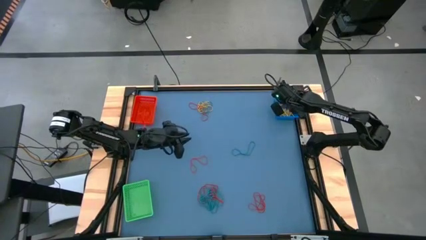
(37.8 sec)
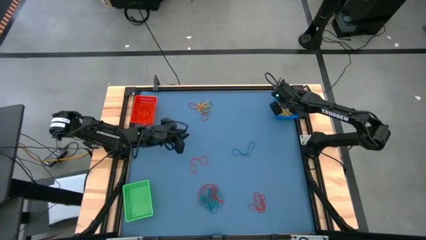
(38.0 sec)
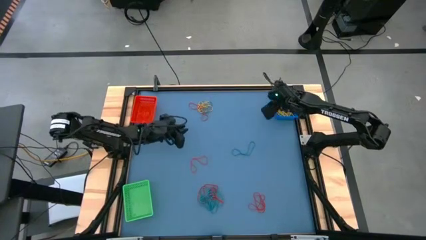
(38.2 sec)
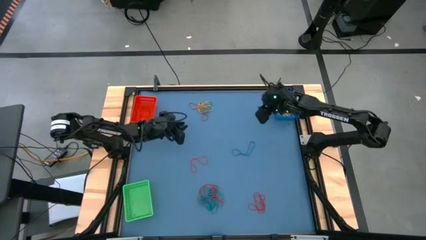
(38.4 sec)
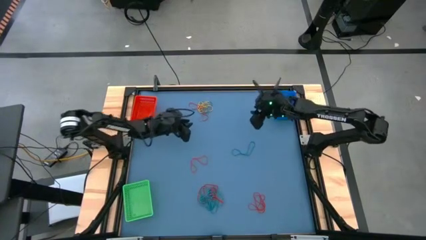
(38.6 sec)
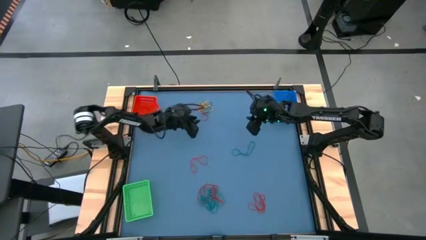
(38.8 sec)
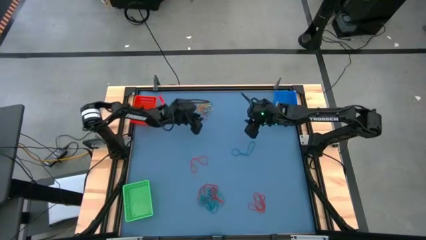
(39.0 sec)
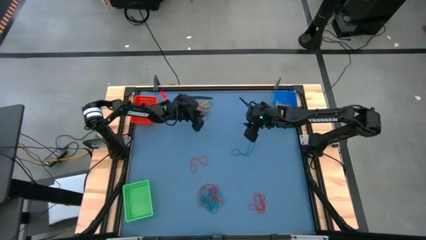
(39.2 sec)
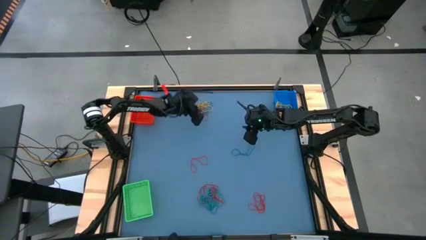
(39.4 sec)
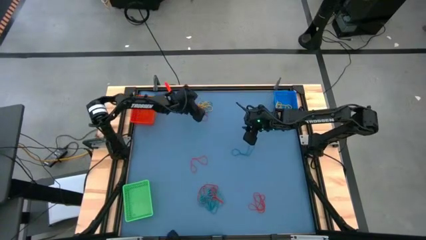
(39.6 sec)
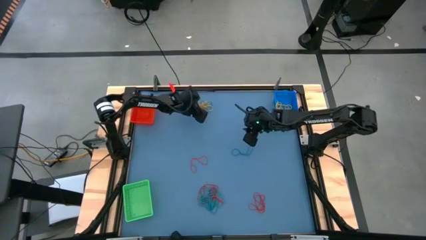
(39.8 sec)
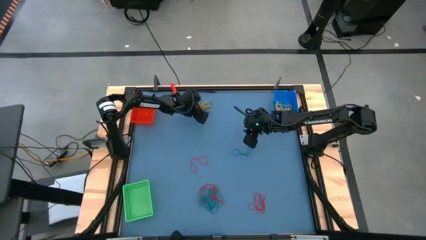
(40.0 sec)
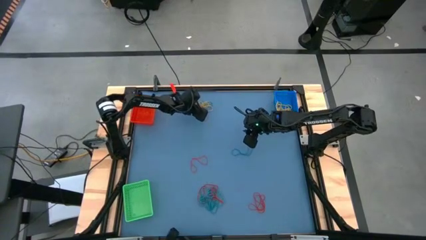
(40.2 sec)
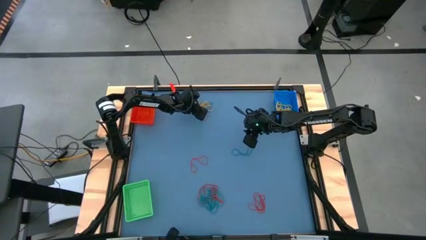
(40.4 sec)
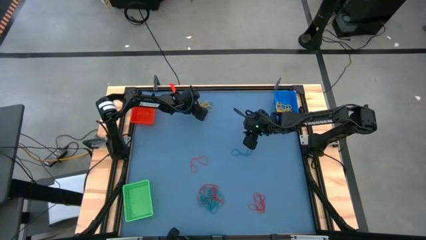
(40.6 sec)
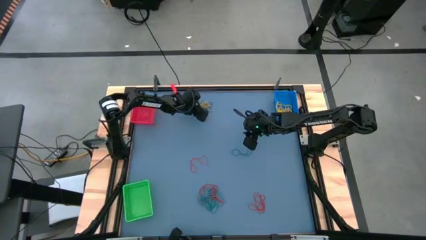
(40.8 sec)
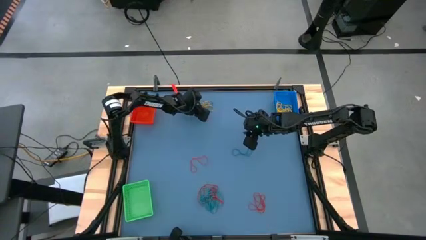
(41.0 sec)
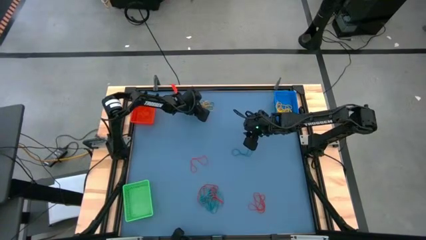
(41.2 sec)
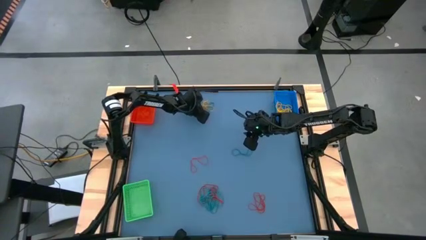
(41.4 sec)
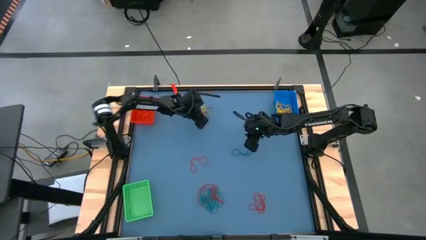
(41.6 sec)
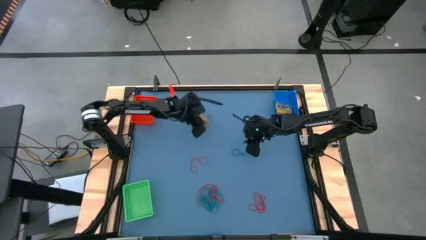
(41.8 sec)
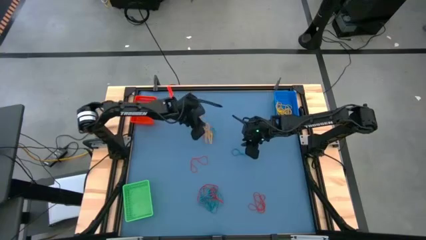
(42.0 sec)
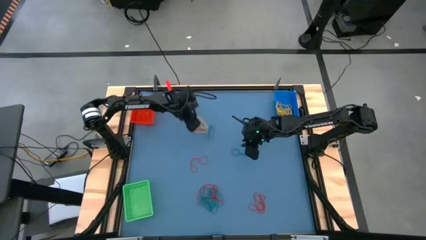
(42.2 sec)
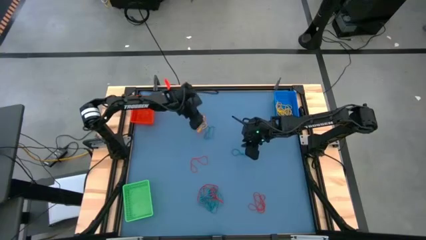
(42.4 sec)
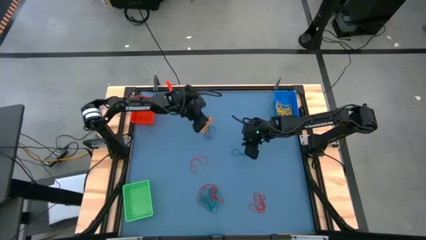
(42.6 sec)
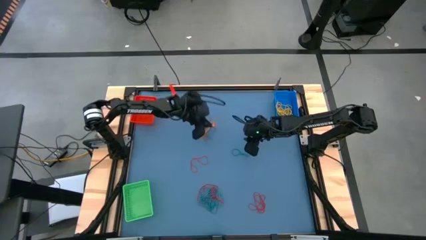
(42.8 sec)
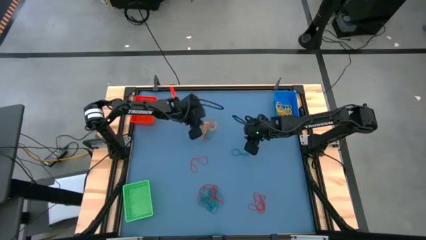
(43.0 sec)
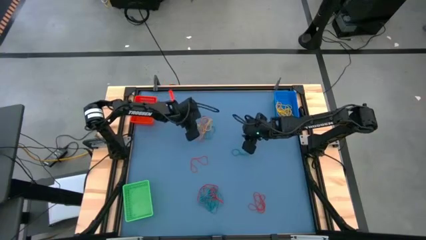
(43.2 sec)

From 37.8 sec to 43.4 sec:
Task: Sort rubber bands into baskets
Put the yellow rubber band into the blue basket

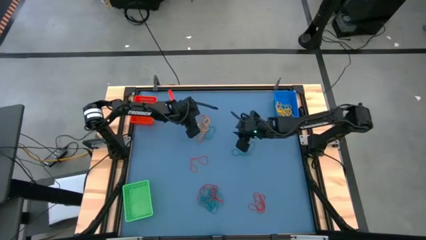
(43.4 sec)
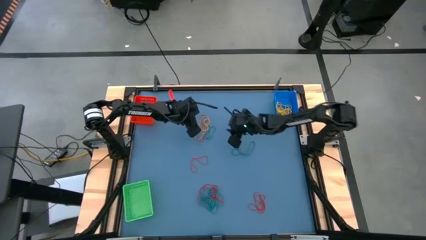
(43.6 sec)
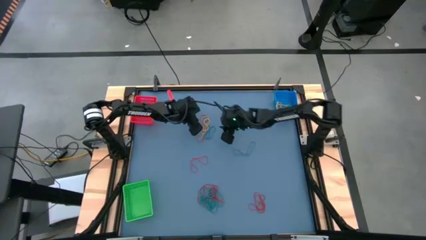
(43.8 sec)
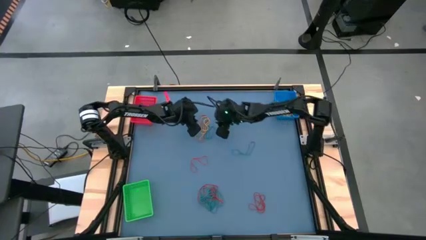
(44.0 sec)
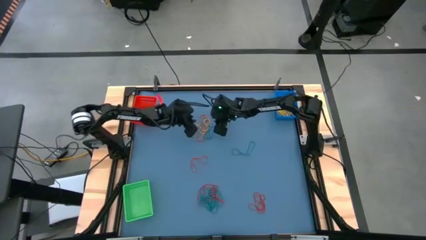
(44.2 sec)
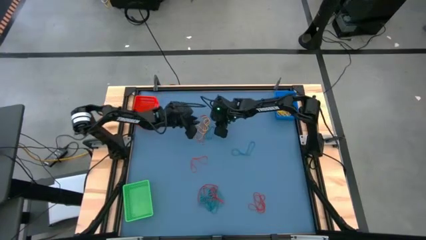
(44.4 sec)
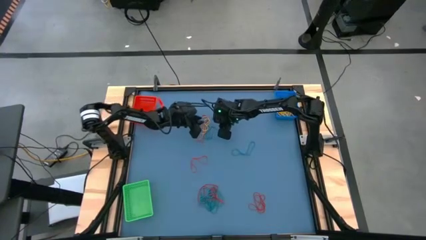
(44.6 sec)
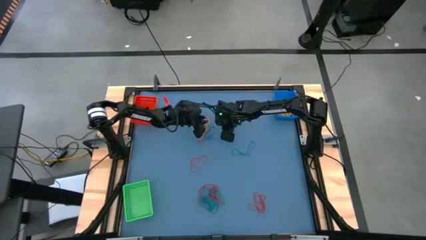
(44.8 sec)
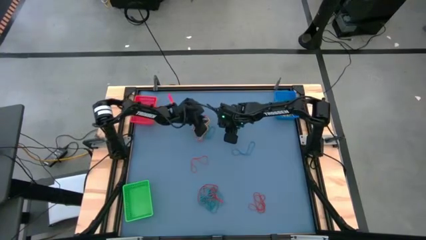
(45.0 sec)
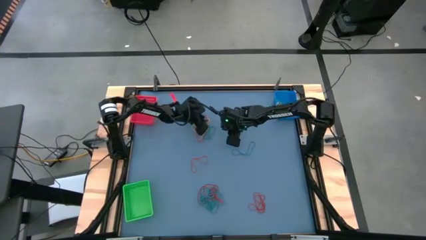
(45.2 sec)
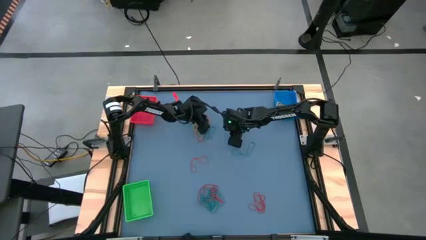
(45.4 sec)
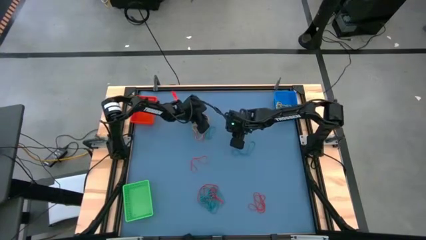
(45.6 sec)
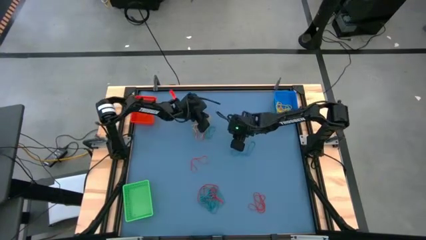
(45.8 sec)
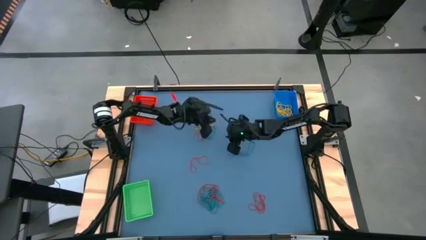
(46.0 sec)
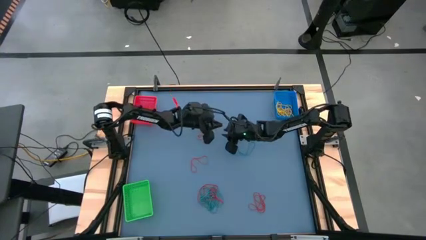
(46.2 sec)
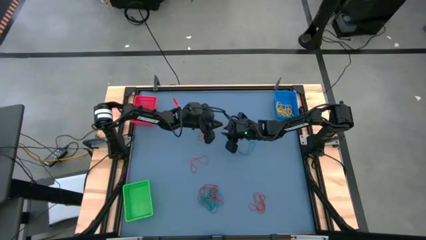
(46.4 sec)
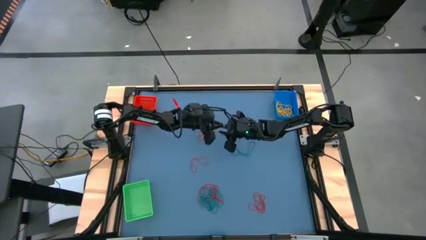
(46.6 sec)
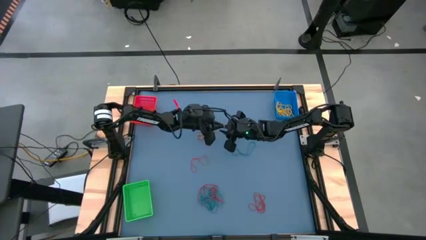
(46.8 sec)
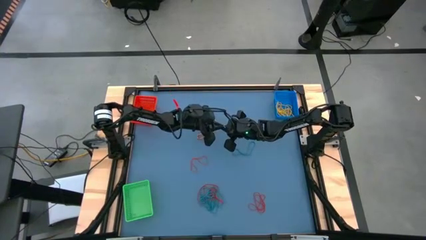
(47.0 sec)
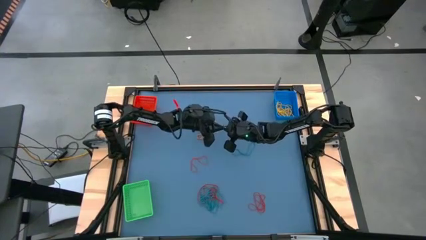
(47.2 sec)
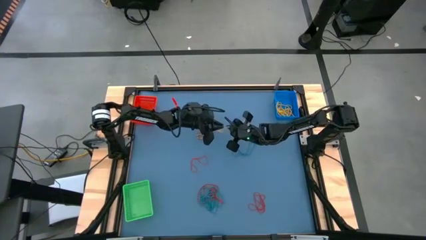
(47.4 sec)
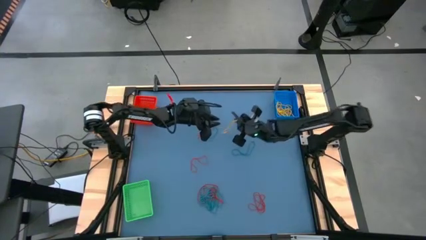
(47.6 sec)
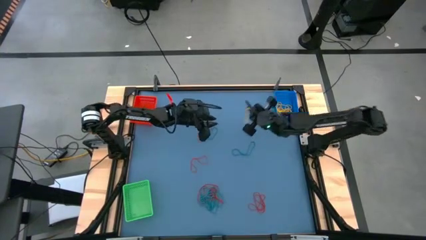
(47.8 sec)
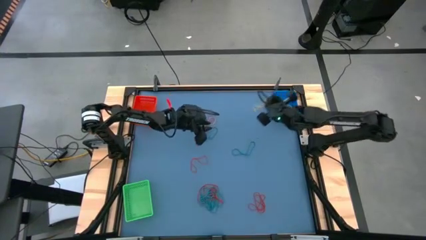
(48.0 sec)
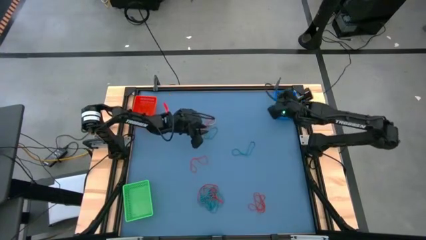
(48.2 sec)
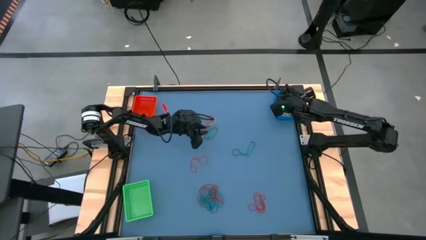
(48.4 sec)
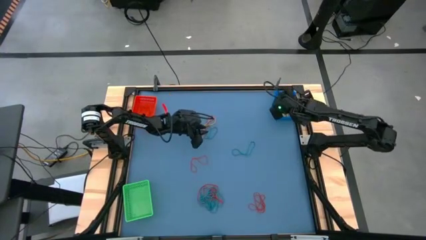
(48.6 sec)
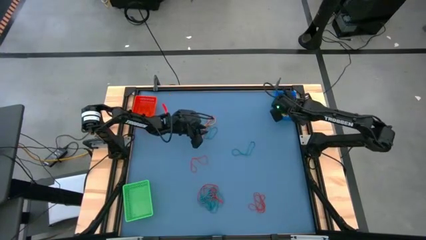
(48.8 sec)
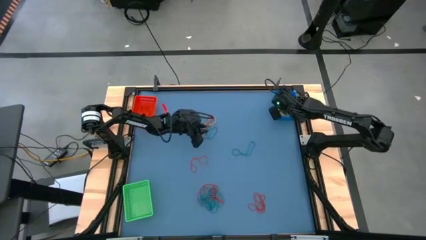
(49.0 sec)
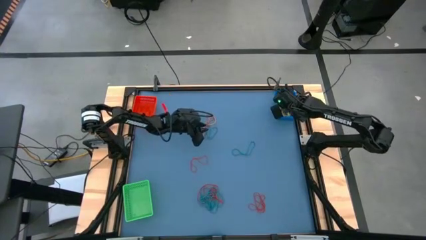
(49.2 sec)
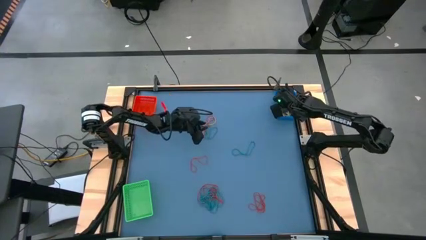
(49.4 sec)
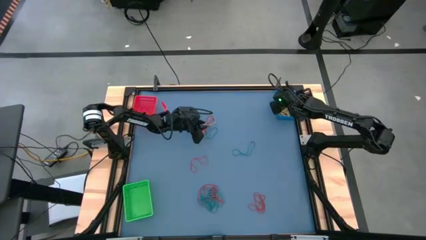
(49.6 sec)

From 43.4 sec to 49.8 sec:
Put the yellow rubber band into the blue basket
